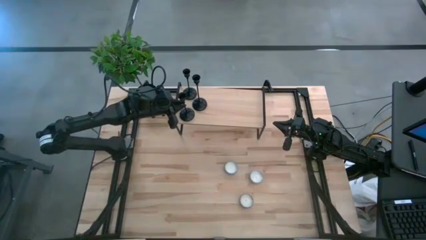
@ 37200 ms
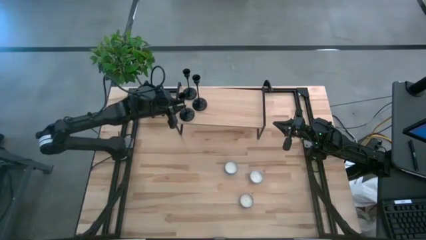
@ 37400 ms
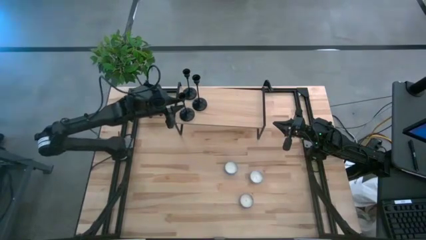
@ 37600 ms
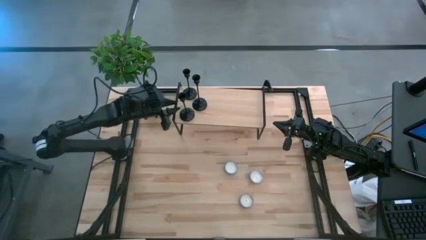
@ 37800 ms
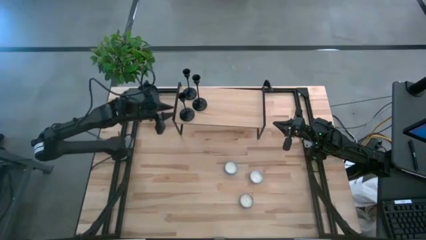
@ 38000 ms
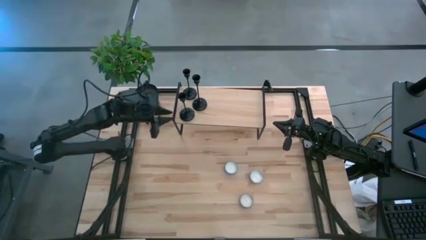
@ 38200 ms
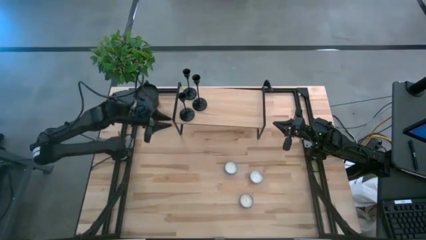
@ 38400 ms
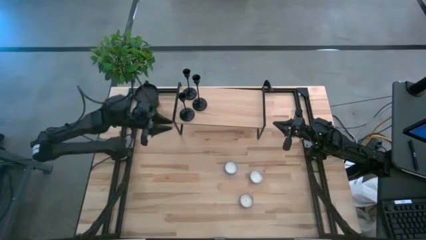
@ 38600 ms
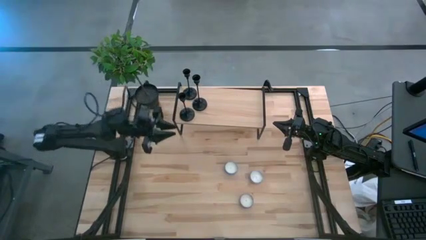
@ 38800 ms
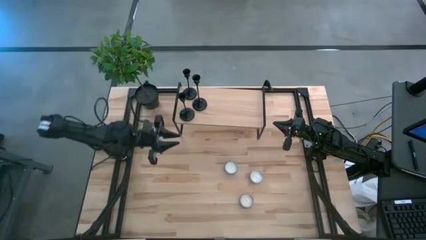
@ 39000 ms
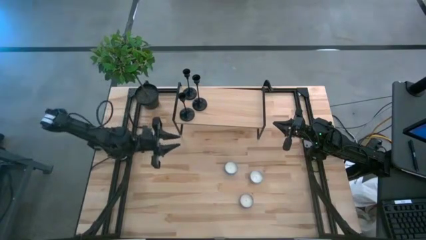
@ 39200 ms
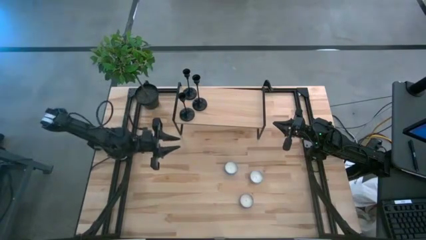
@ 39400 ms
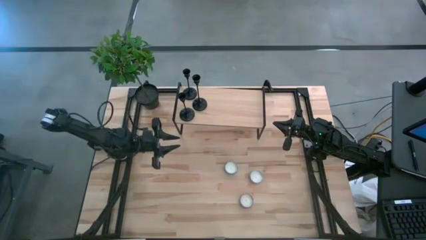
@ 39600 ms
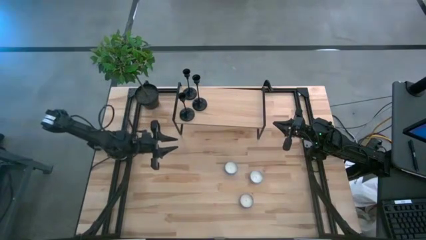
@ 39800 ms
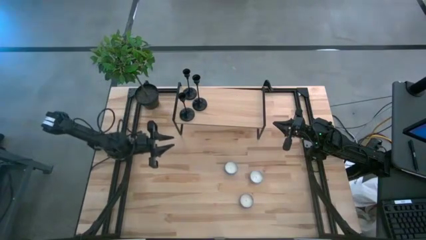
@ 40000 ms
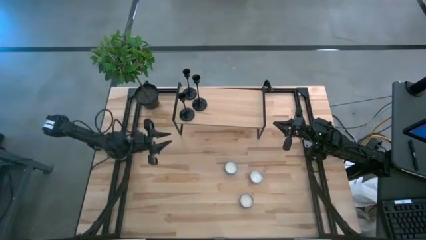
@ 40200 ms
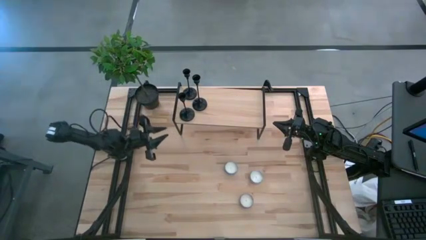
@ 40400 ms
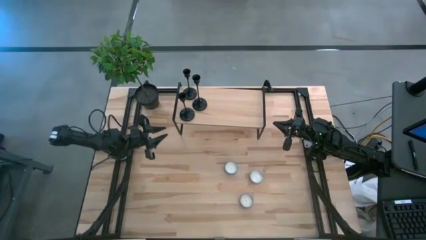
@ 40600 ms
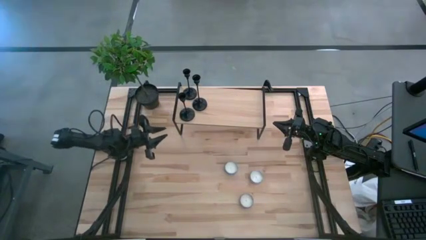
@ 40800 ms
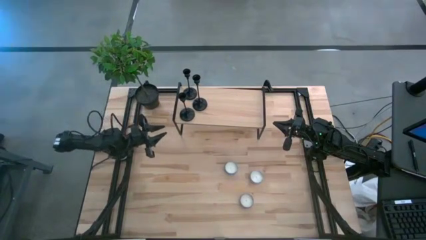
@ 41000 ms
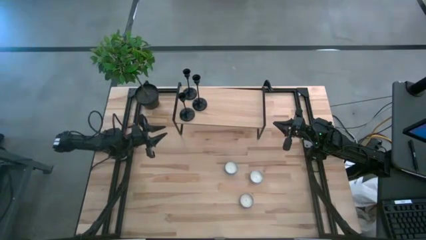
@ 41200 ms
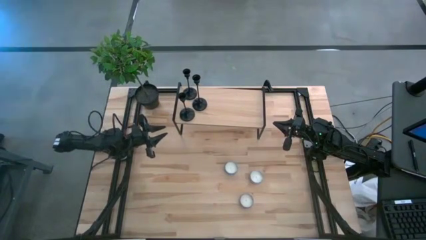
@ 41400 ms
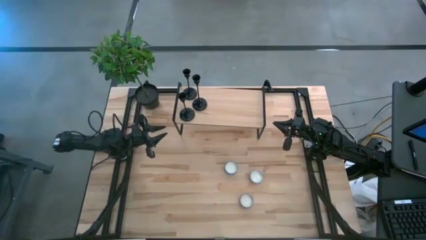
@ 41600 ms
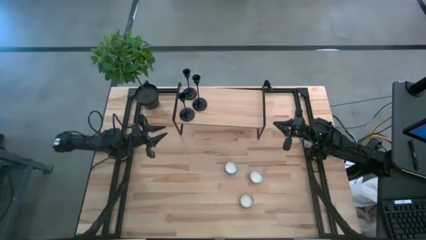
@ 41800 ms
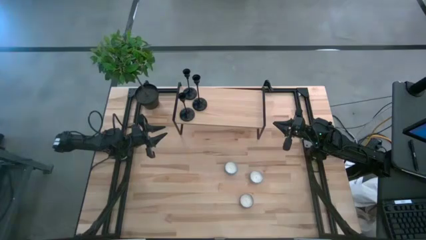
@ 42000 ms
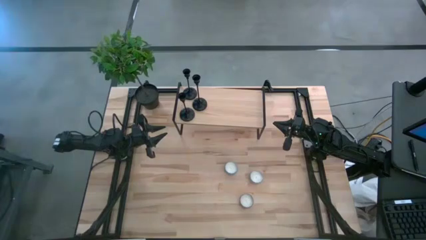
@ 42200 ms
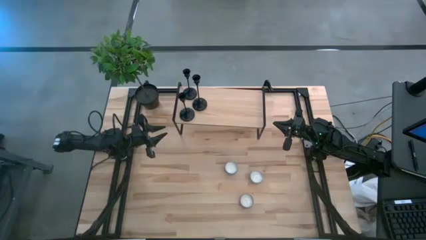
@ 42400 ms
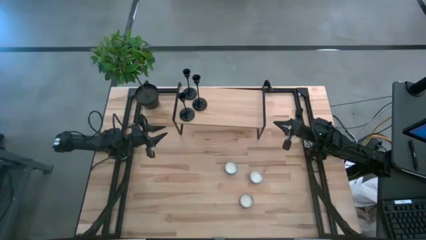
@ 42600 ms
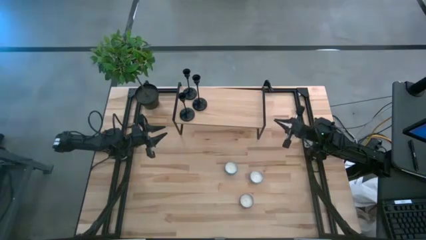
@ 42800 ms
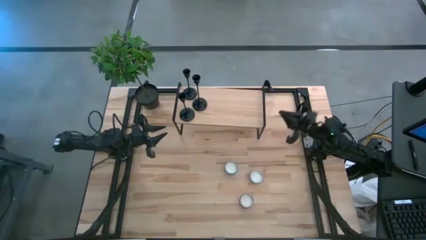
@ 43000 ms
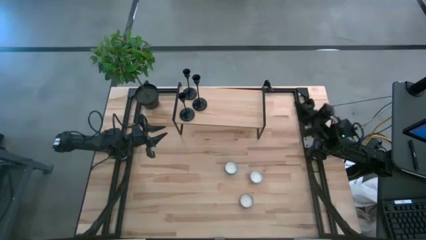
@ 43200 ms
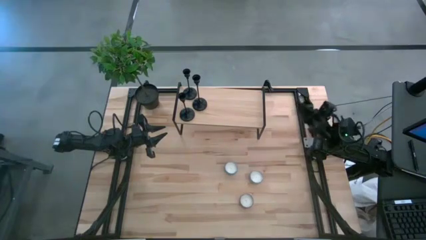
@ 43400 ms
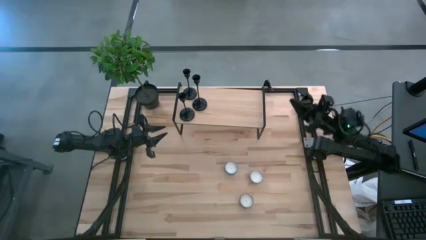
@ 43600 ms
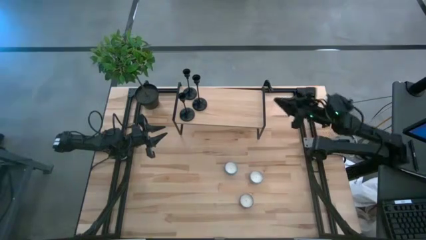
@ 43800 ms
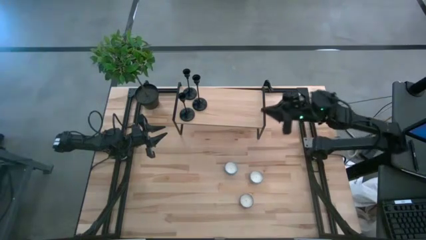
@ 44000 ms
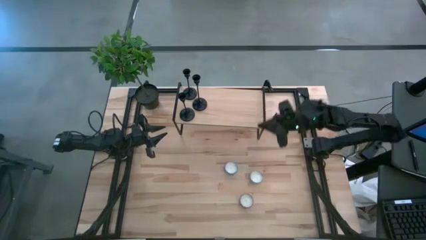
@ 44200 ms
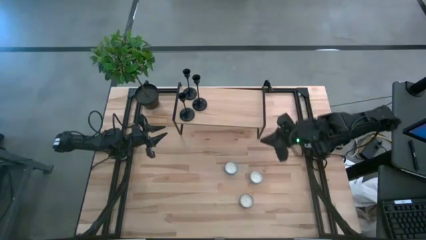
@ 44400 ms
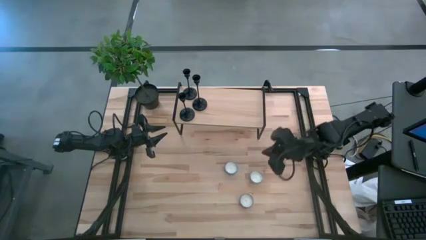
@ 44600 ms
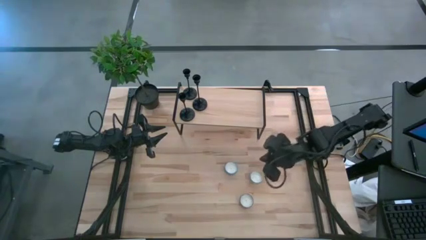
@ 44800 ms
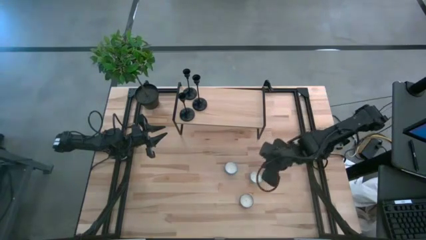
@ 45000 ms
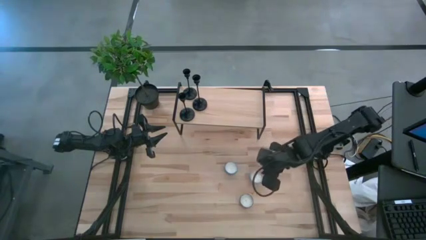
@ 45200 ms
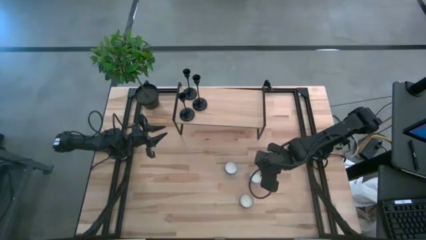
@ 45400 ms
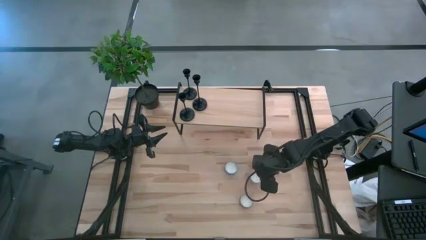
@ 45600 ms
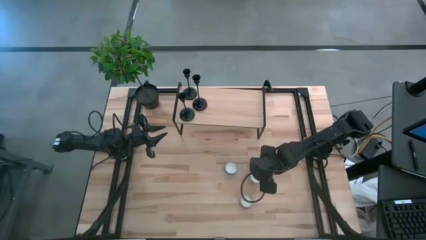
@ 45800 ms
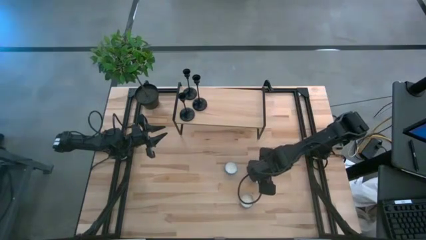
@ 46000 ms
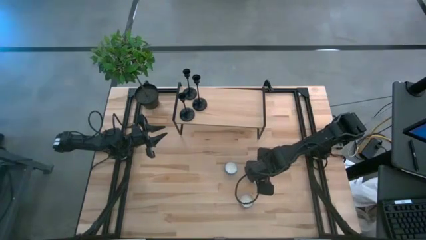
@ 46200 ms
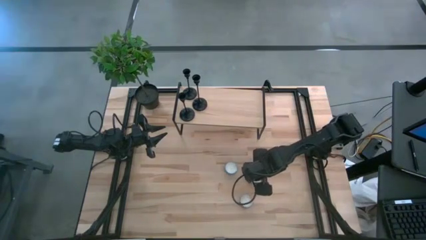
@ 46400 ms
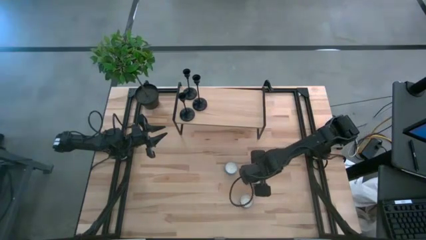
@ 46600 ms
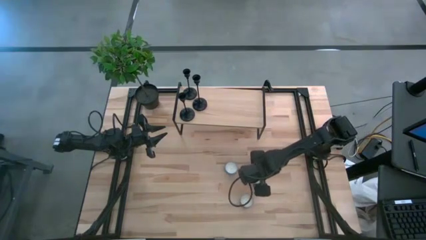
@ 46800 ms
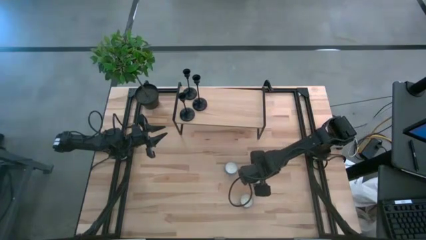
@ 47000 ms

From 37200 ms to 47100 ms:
Task: Pick & Place candle stick holders
Put the red patterned scented candle on the shelf

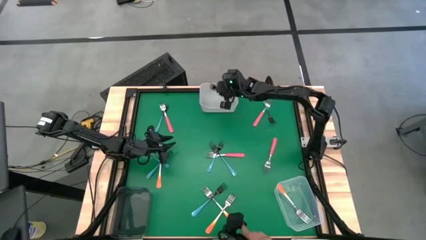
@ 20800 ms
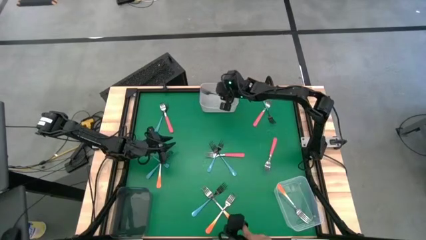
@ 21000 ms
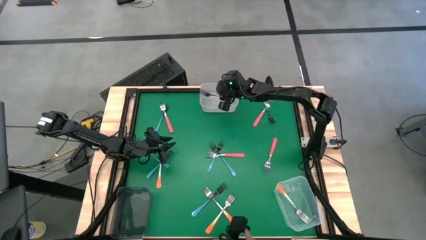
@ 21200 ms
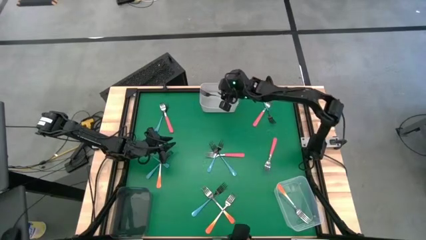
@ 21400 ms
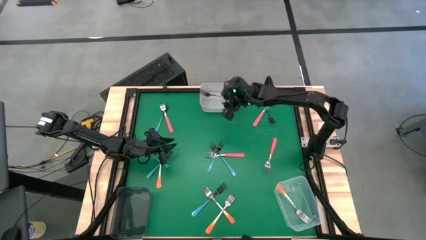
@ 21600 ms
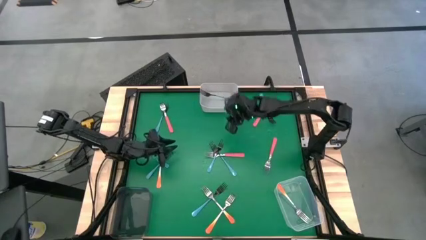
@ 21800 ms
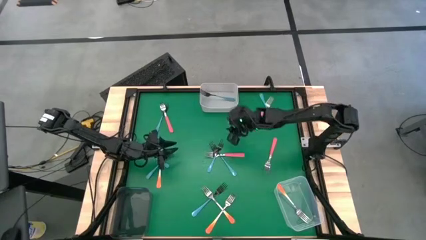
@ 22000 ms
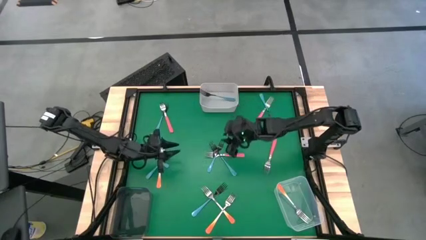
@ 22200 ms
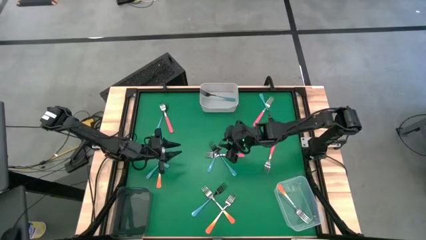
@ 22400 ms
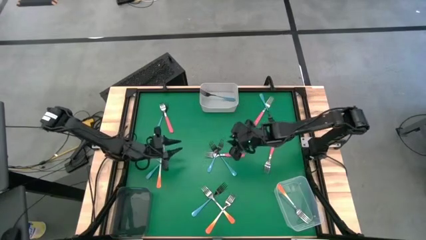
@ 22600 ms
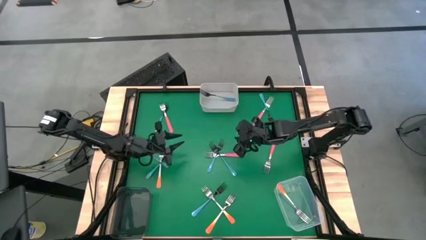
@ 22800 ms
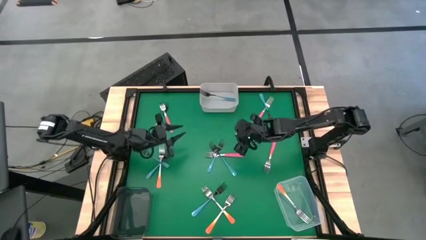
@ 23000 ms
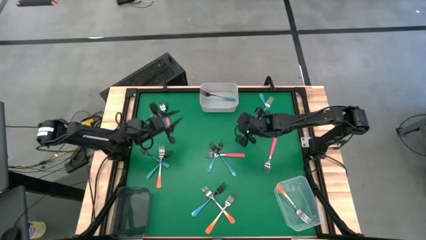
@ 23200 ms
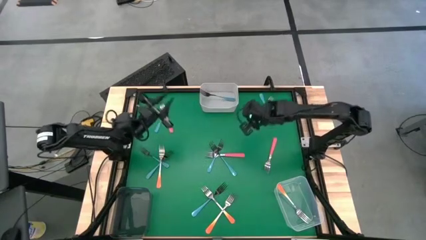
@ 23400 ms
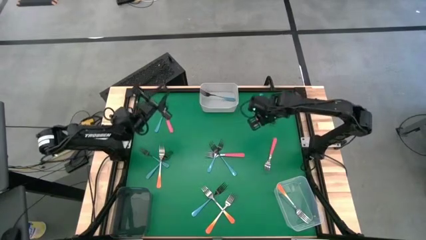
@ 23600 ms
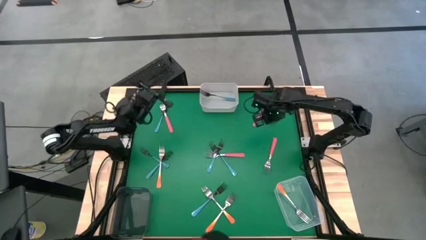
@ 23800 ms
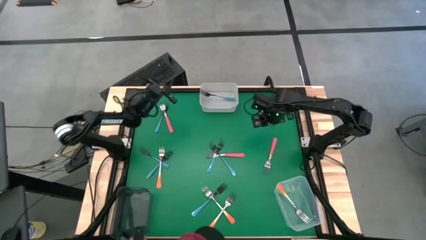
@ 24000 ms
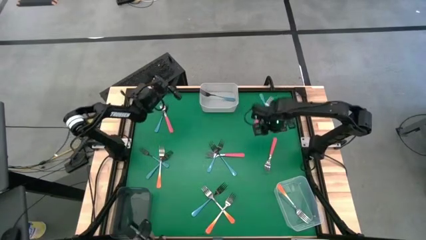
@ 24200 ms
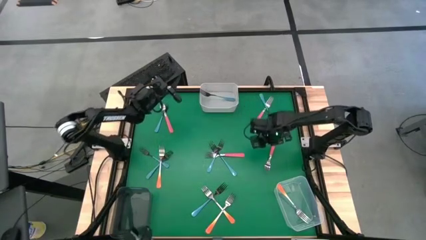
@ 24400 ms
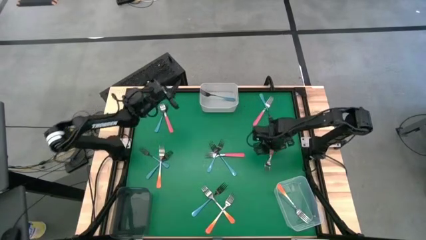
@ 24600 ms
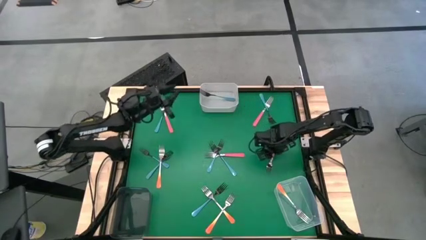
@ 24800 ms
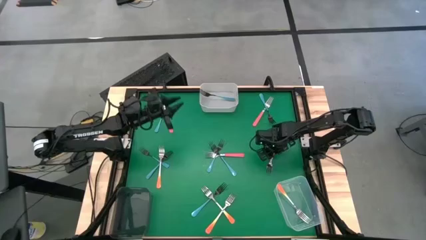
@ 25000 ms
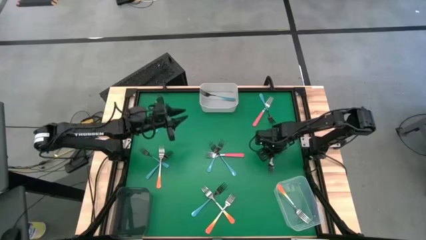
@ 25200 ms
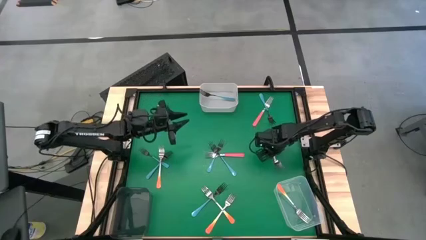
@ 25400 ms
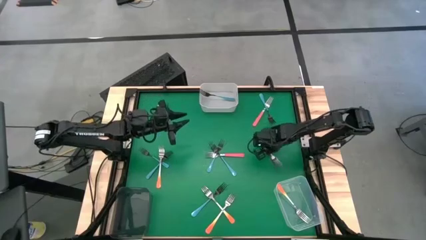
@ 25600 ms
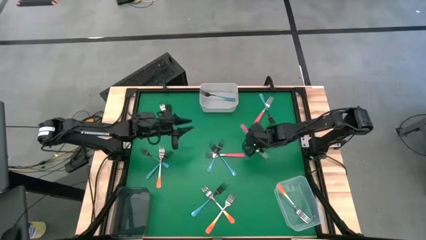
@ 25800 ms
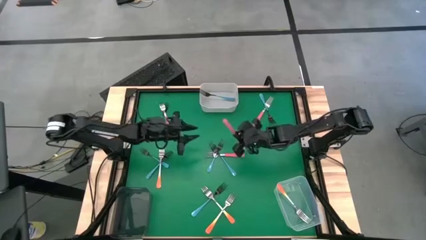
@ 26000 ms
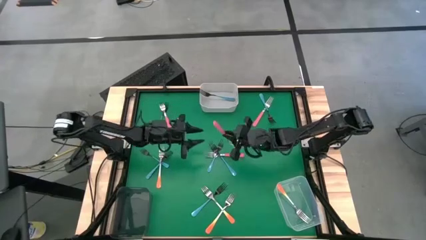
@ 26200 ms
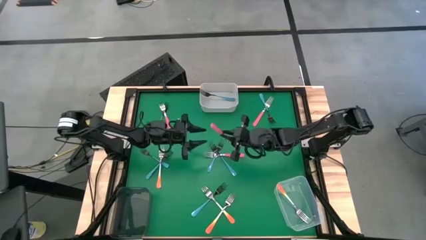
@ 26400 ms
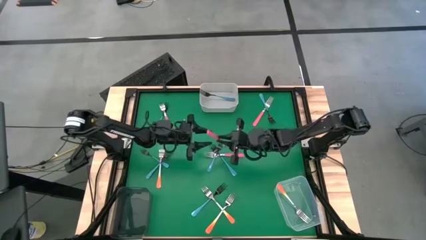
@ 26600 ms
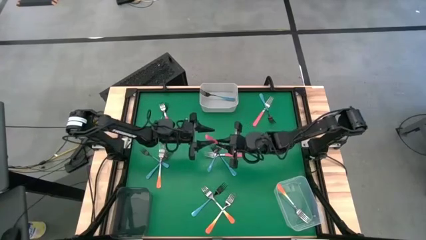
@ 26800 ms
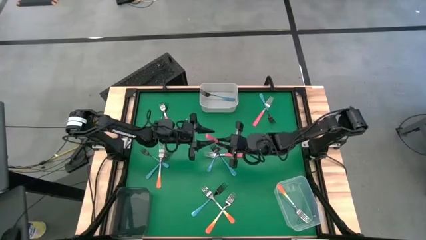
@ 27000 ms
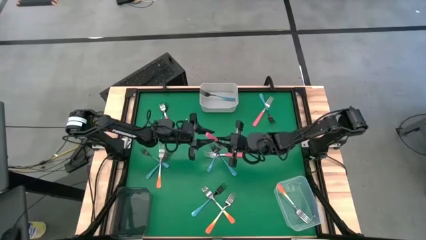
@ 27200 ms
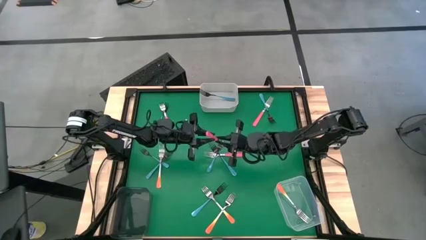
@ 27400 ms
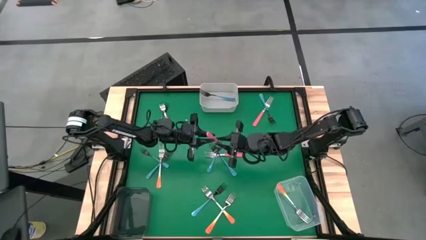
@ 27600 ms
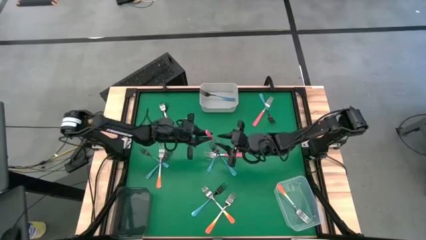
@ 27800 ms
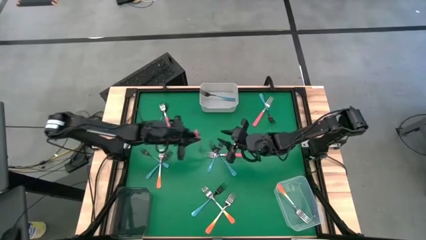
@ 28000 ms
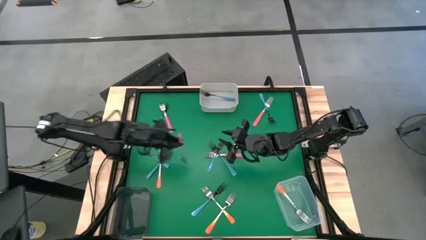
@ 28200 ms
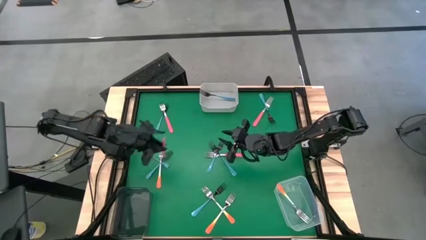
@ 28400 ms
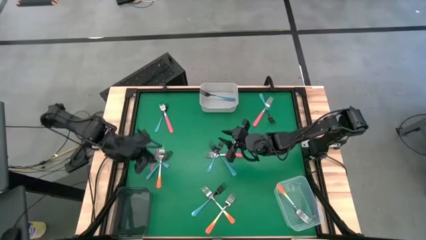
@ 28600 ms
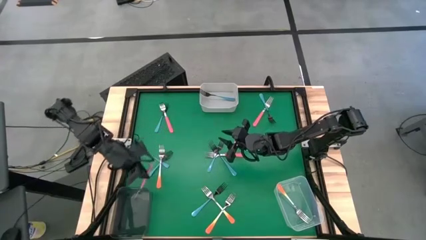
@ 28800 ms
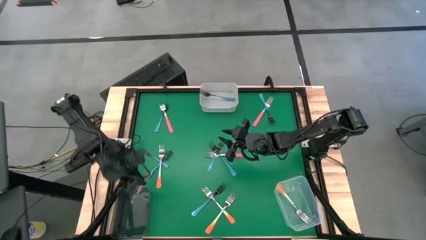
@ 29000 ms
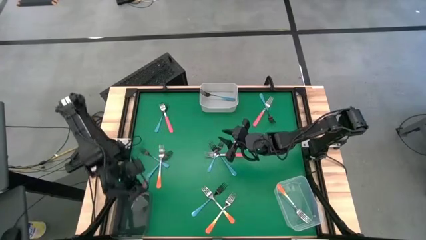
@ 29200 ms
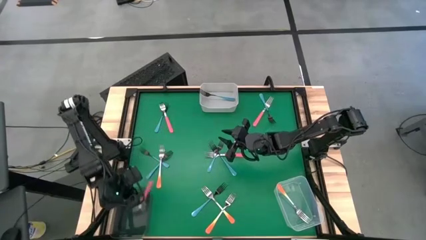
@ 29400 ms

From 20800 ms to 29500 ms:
Task: Sort silverware by color (type)
Put the right red fork into the black bin
